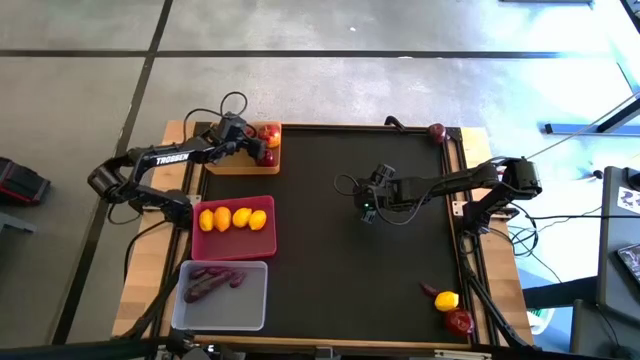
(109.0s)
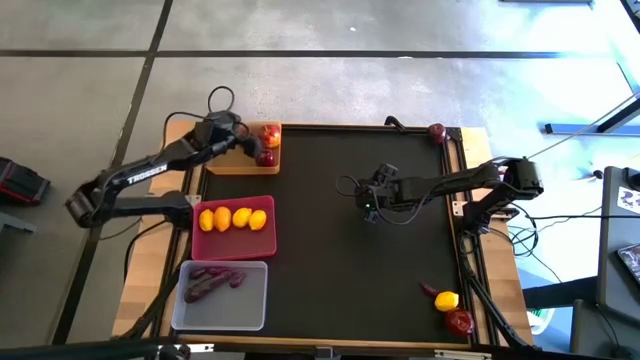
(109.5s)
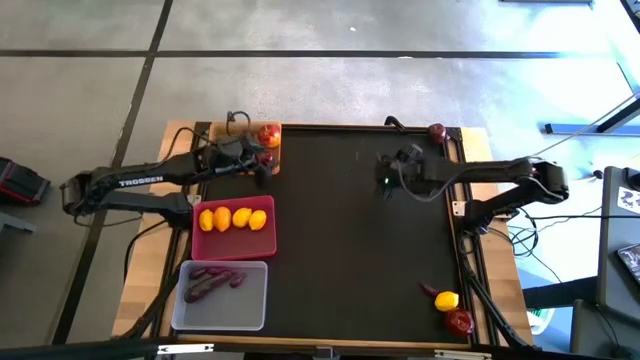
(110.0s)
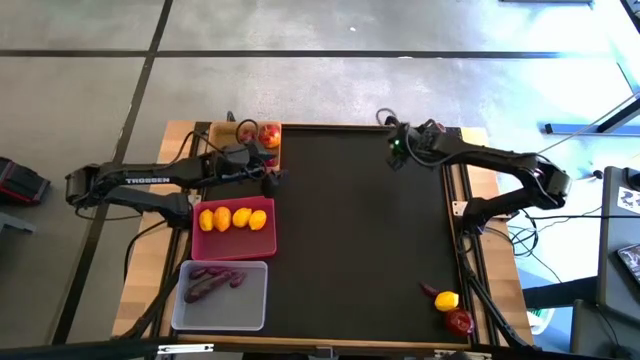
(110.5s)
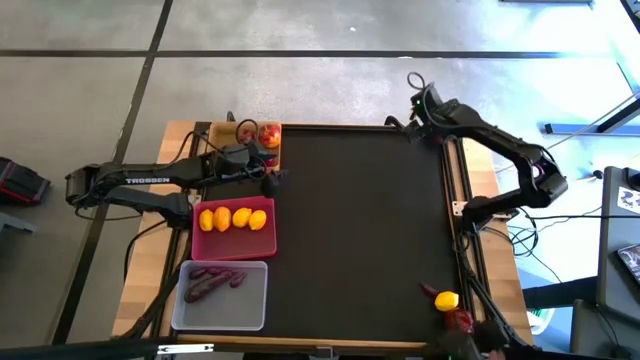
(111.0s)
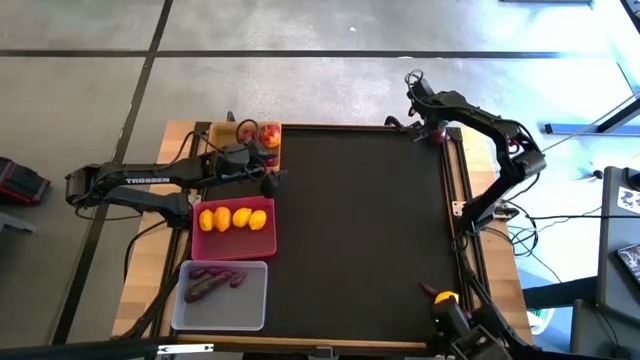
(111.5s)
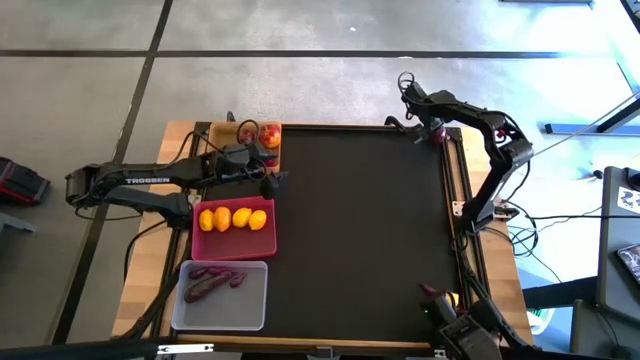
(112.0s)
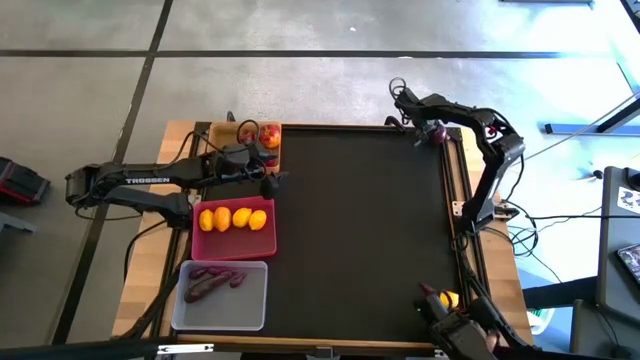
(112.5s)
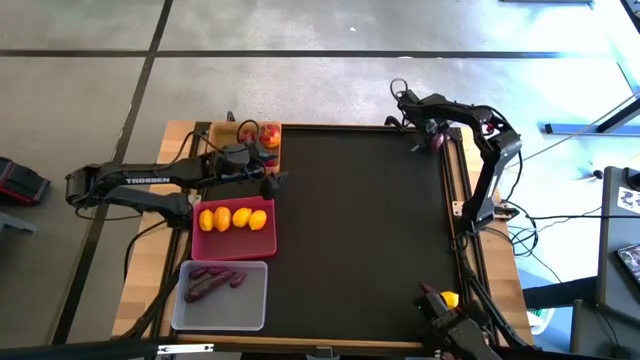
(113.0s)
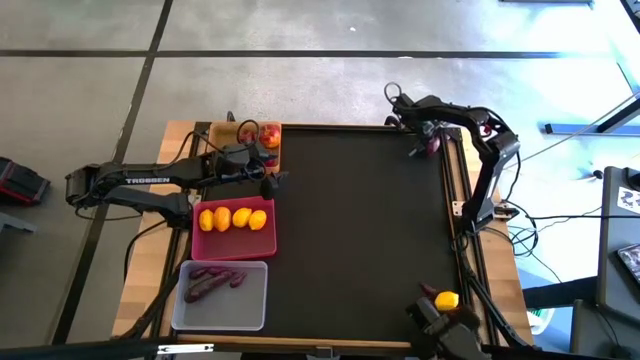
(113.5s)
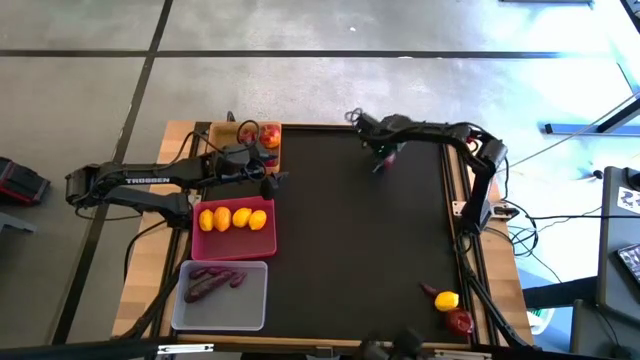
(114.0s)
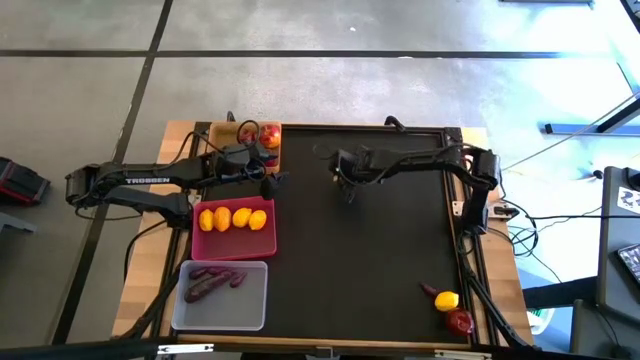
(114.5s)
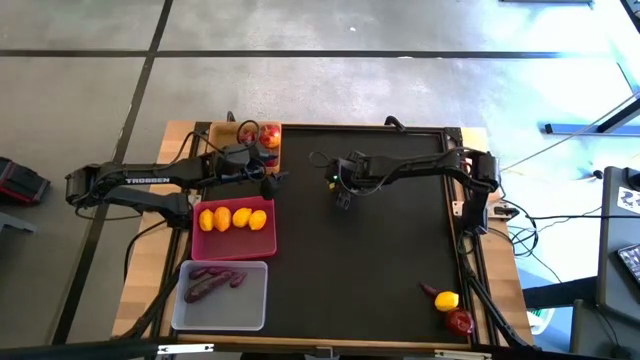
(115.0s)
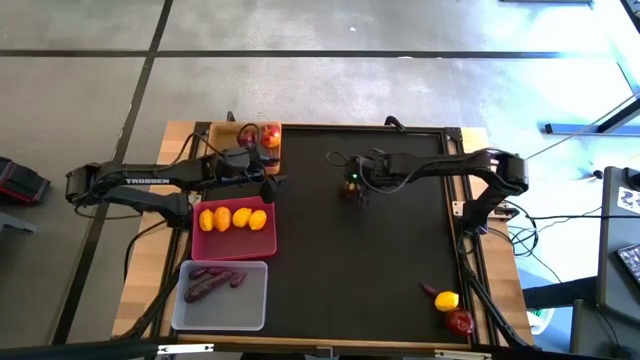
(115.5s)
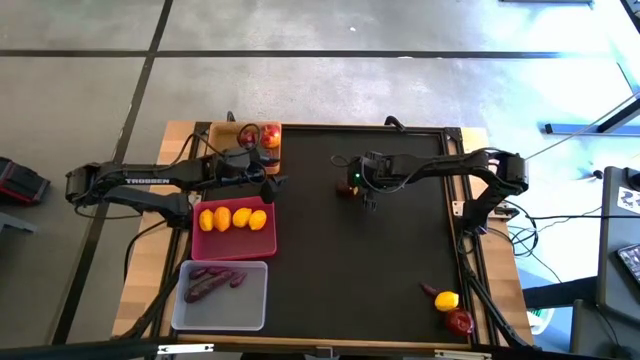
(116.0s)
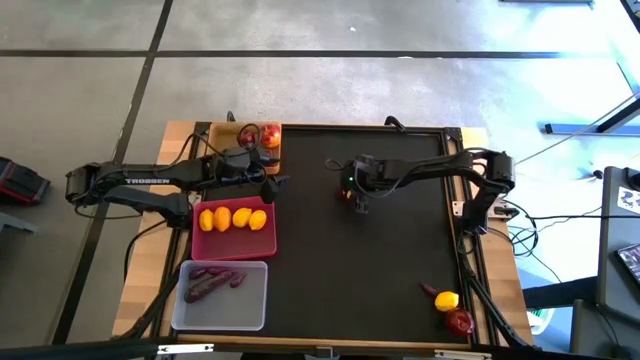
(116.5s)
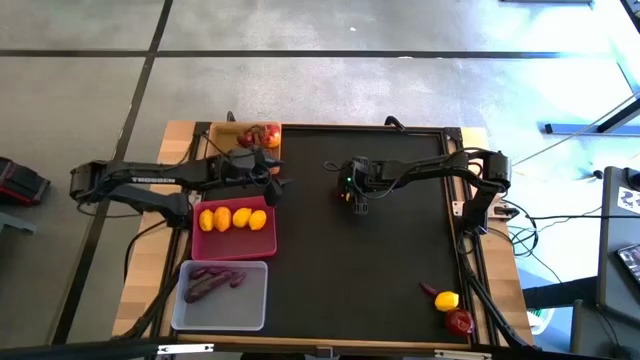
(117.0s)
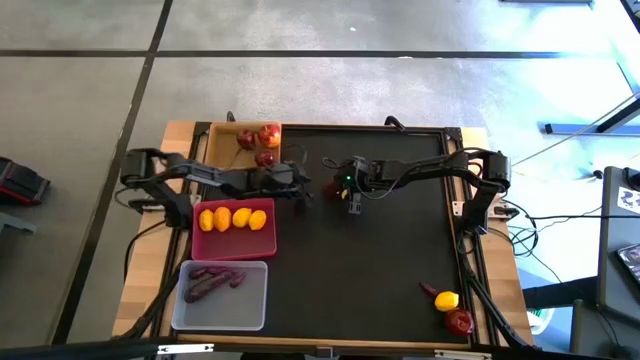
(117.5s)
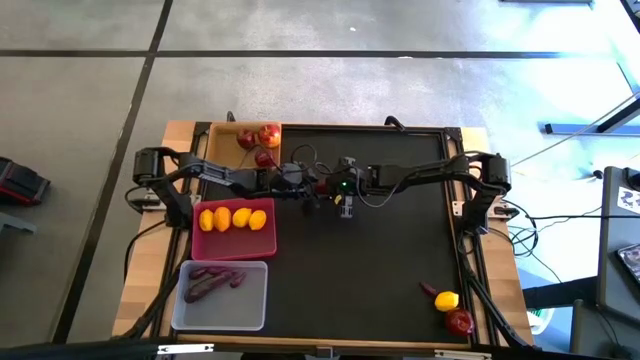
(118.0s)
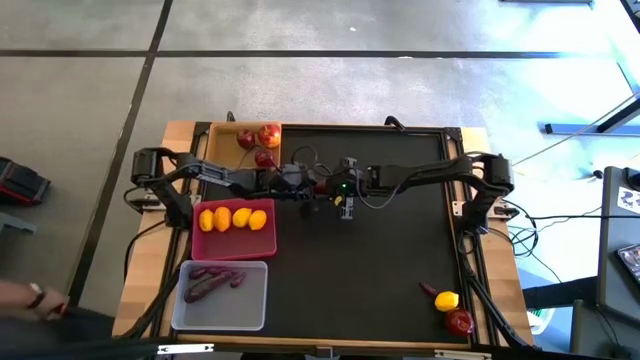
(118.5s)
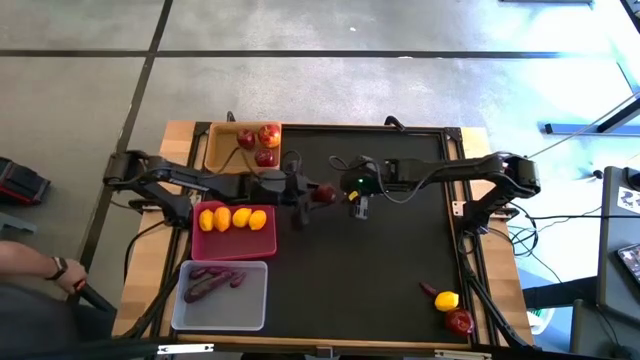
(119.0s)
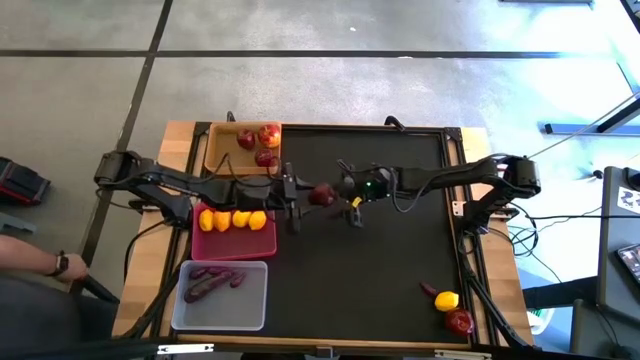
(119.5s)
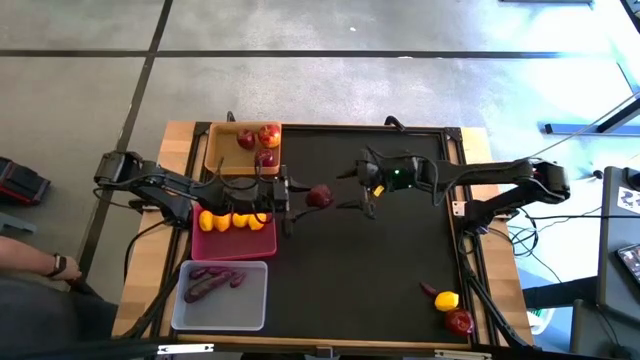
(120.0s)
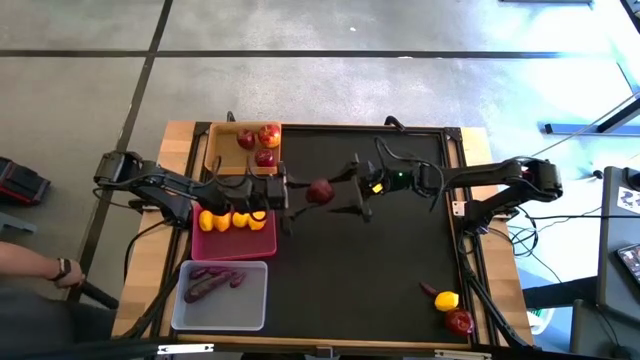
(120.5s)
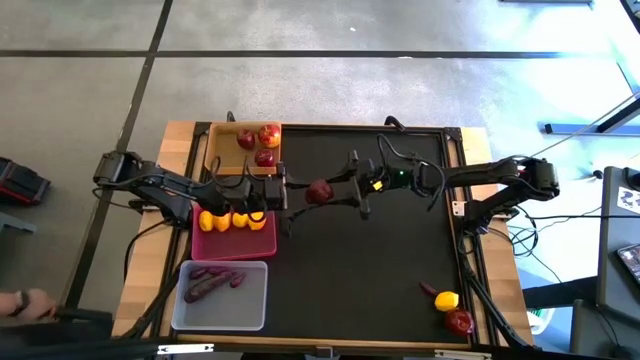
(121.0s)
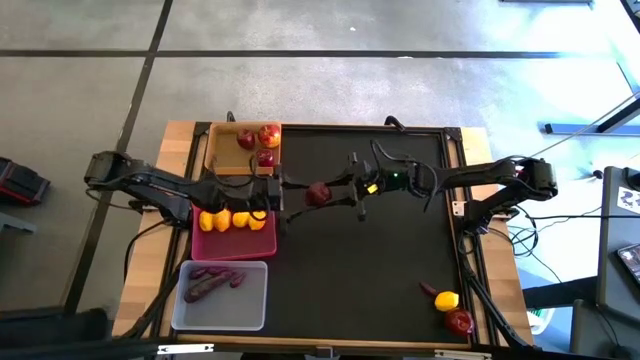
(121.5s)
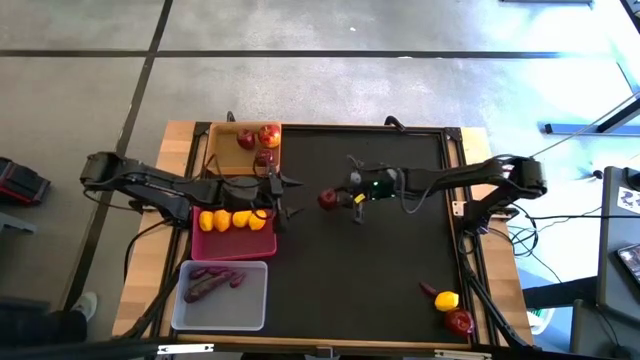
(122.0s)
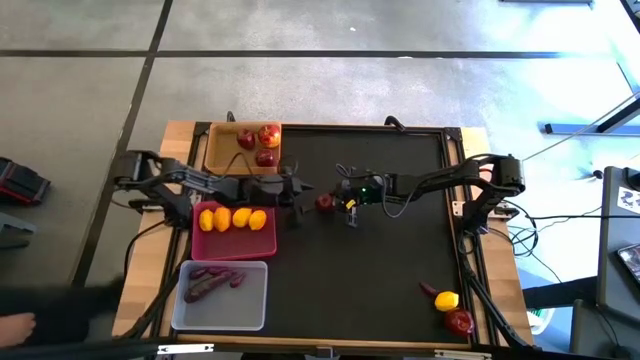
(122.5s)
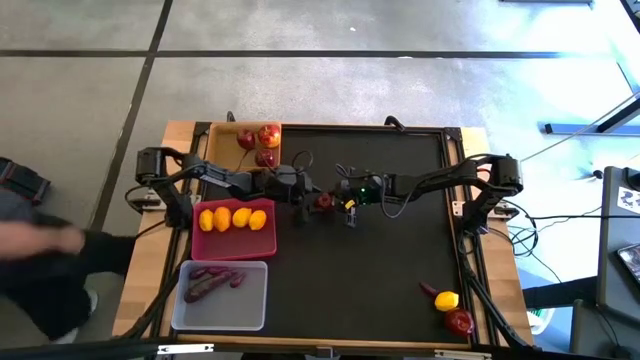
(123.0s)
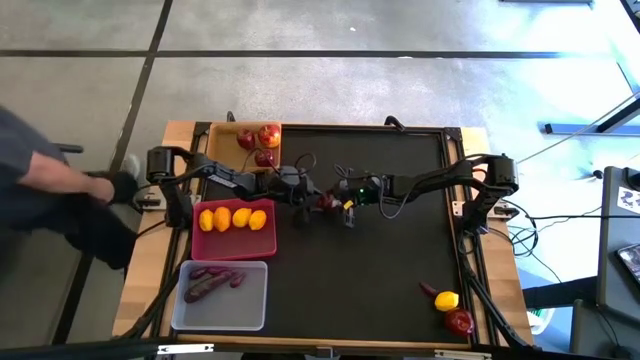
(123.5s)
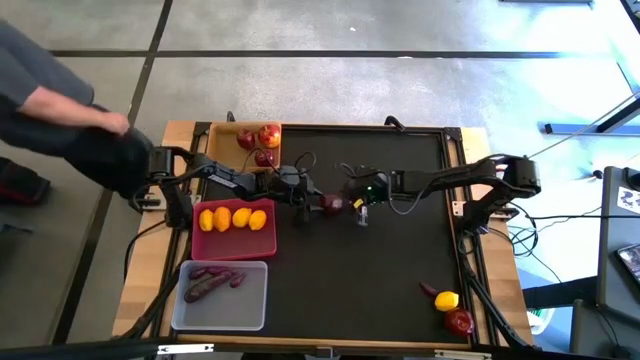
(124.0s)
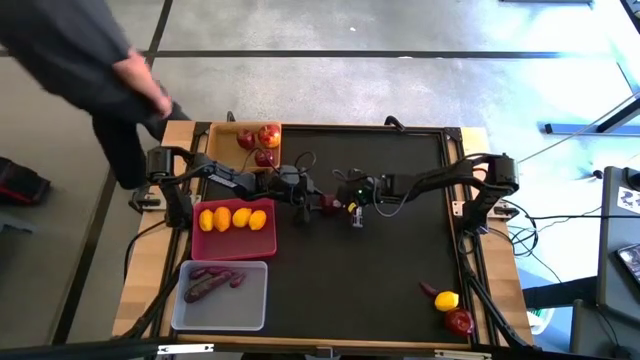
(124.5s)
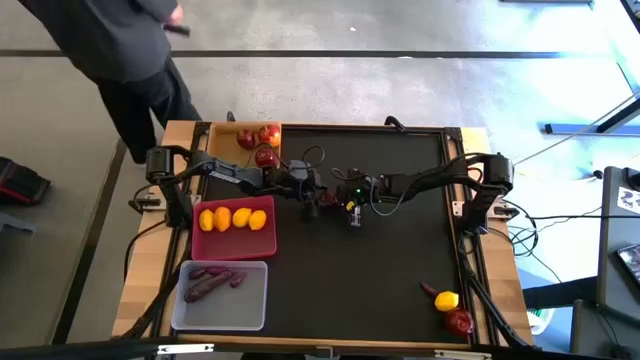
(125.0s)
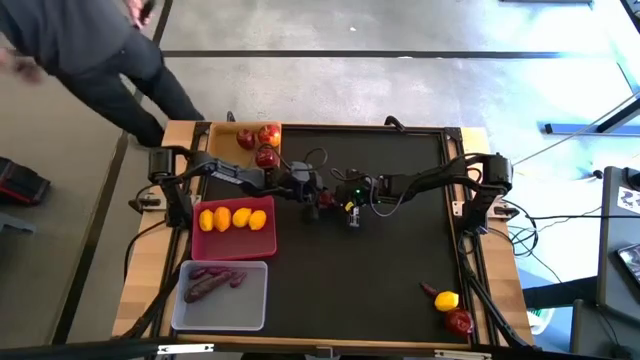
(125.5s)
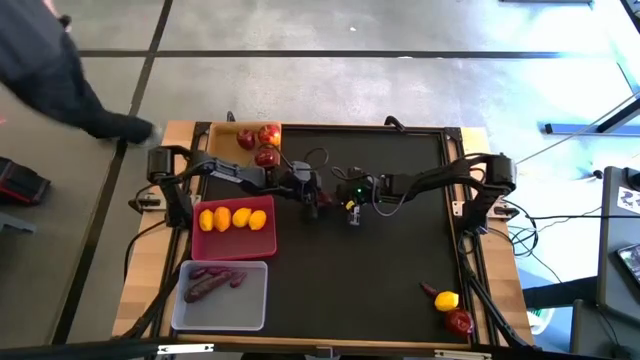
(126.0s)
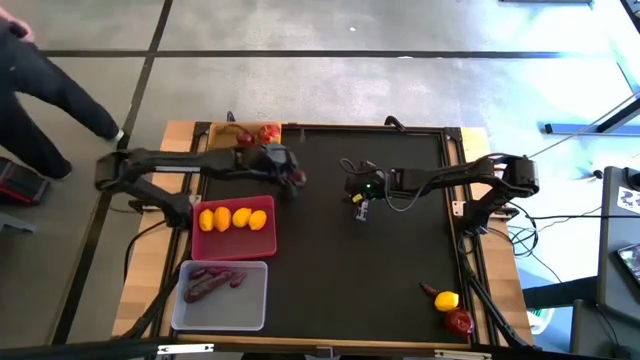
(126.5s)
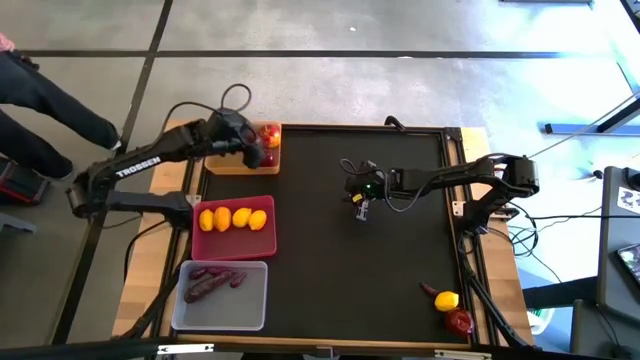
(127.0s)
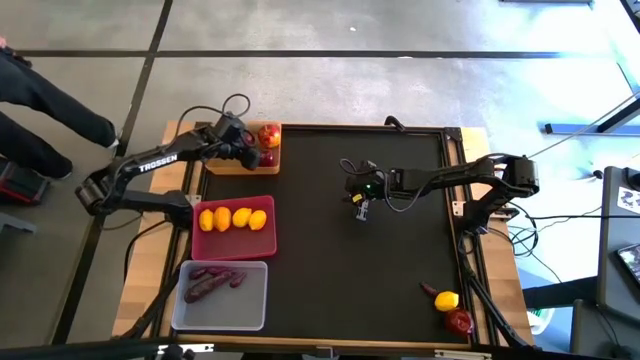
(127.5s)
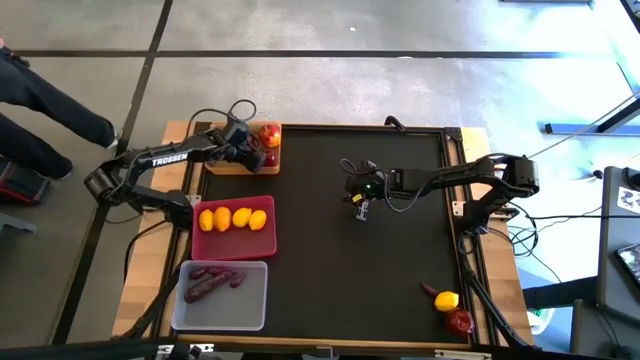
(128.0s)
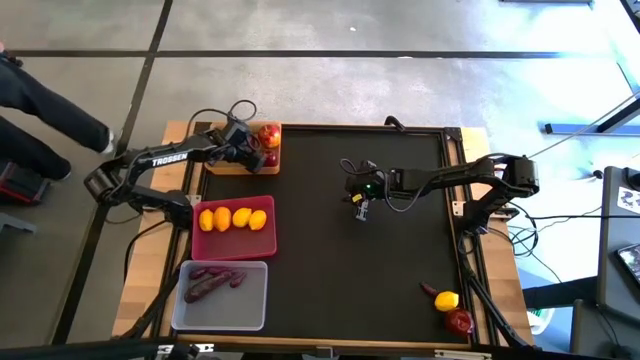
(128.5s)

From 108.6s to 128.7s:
Task: Sort produce into baskets
Put the top red apple into the orange bin

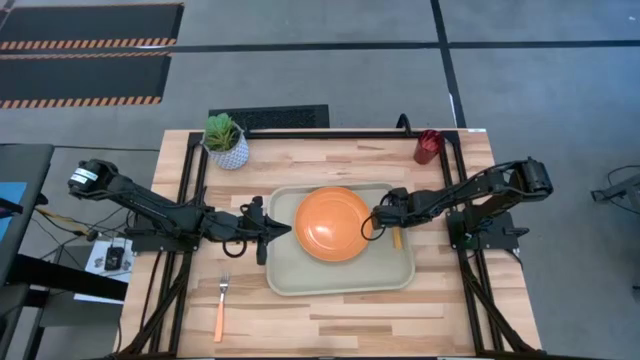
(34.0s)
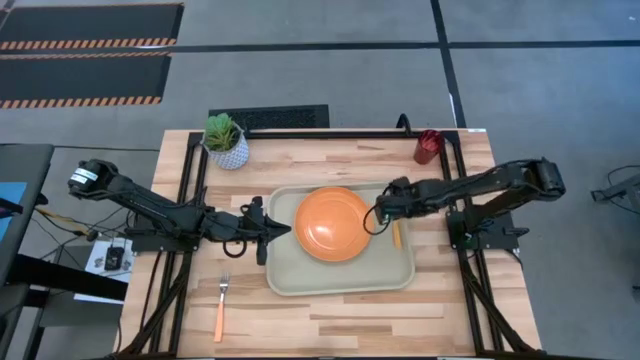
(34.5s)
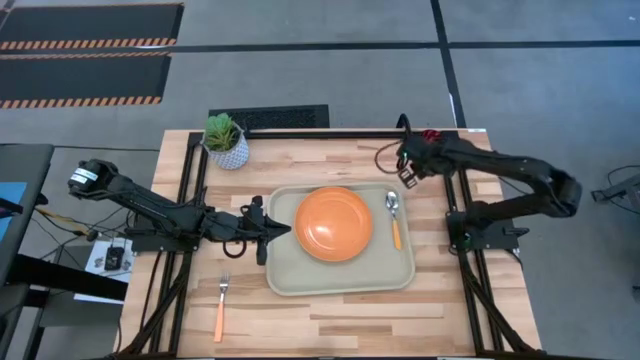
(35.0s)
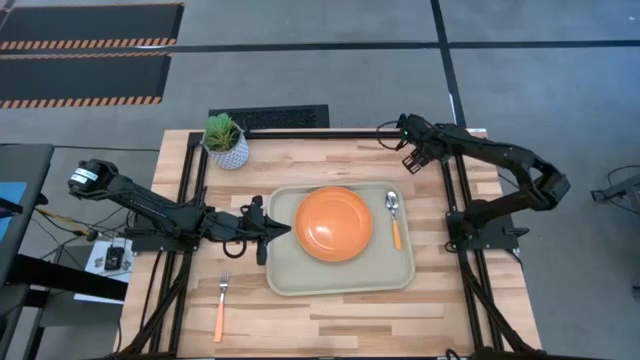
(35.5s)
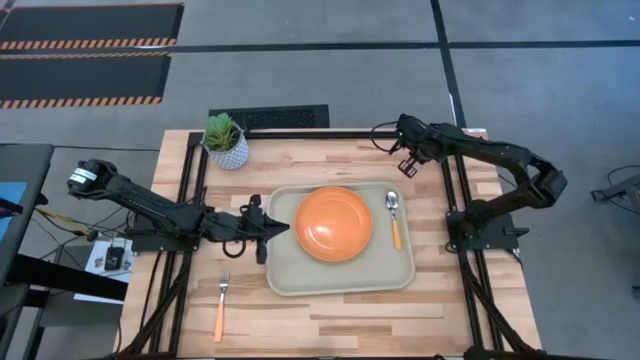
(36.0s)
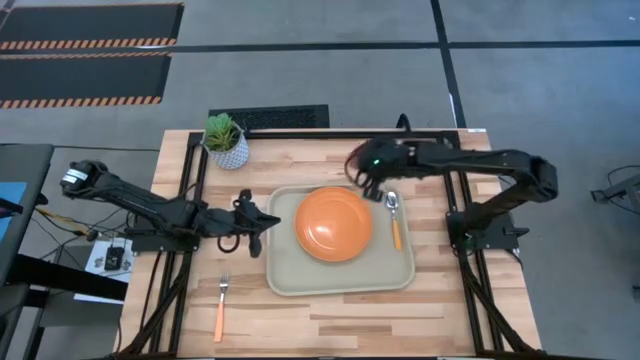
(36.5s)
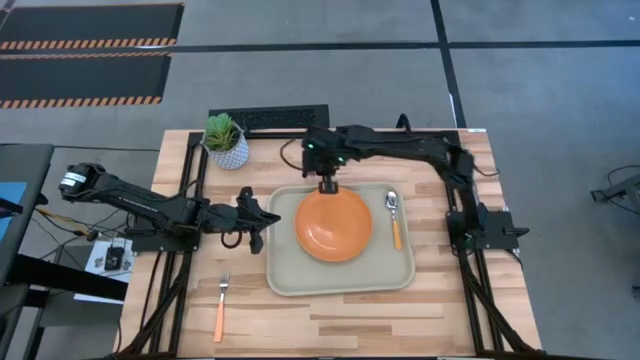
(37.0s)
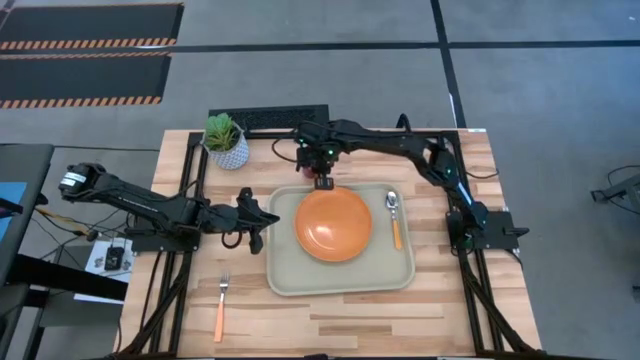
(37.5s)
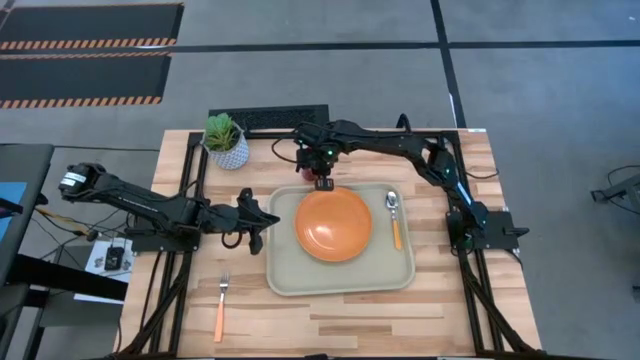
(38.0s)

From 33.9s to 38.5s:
Task: Pick and place plate/cup/fork/spoon on tray
Move the red cup to the top of the gray serving tray
